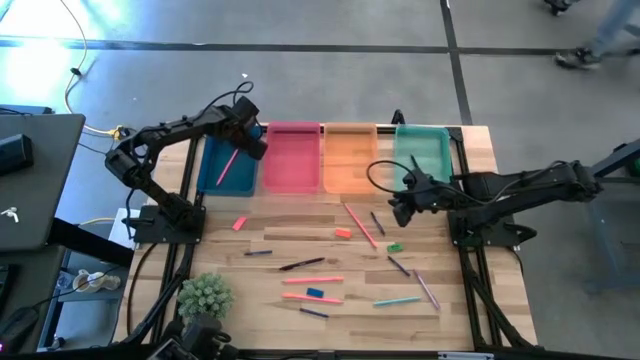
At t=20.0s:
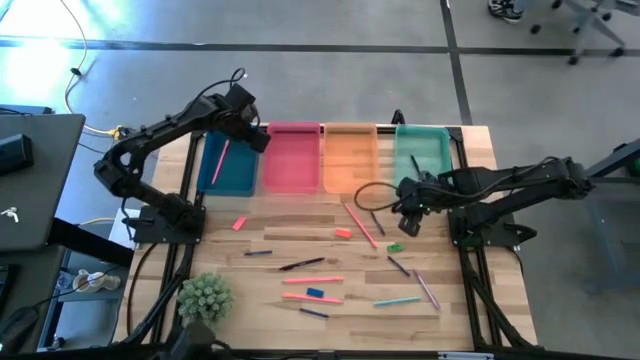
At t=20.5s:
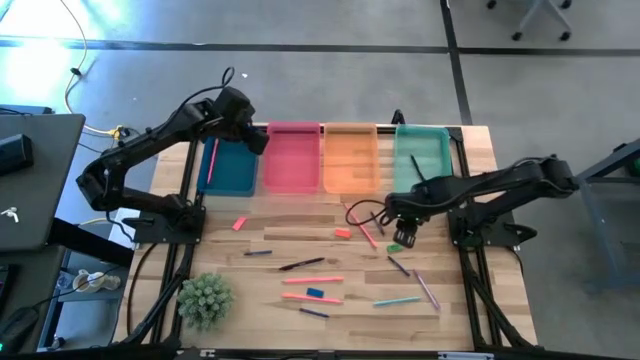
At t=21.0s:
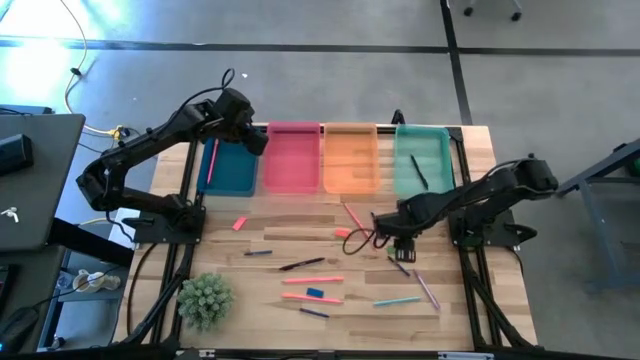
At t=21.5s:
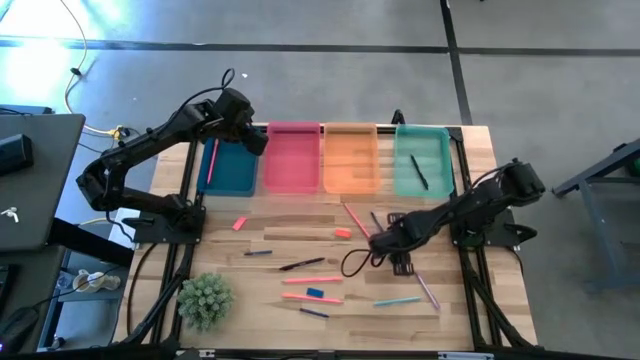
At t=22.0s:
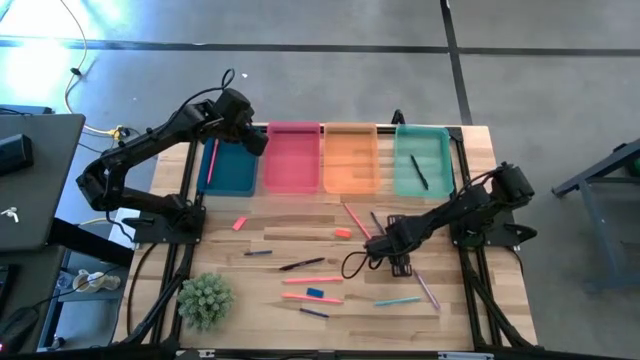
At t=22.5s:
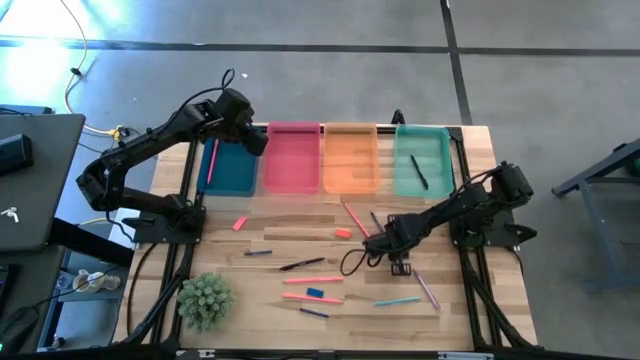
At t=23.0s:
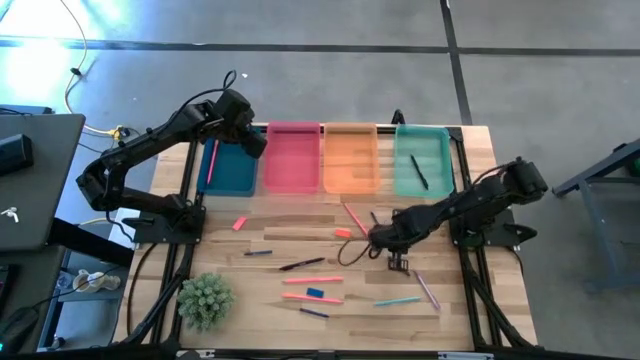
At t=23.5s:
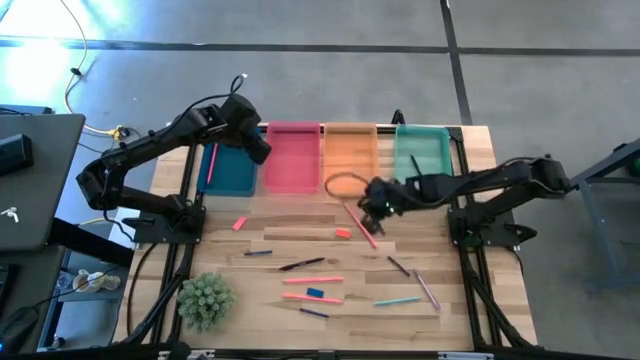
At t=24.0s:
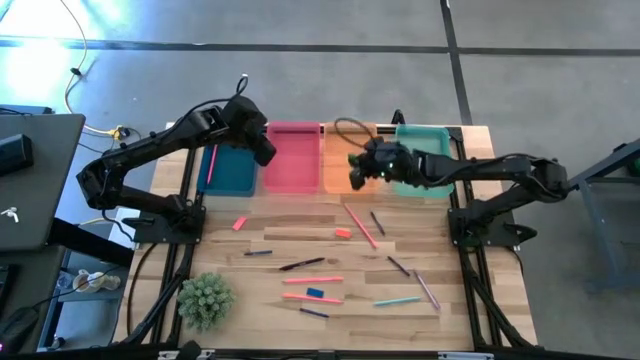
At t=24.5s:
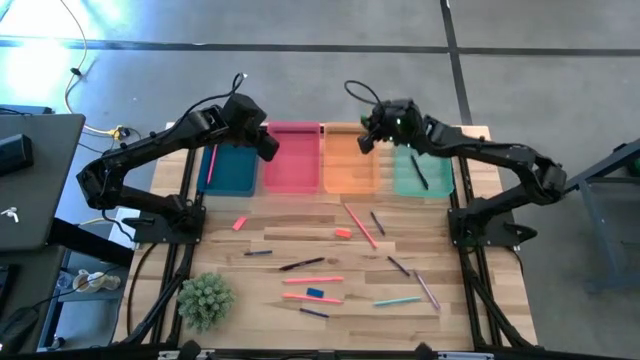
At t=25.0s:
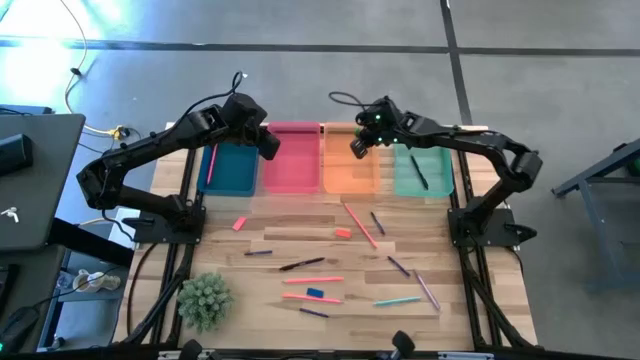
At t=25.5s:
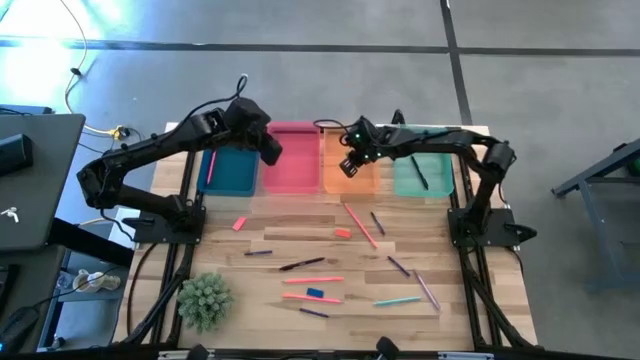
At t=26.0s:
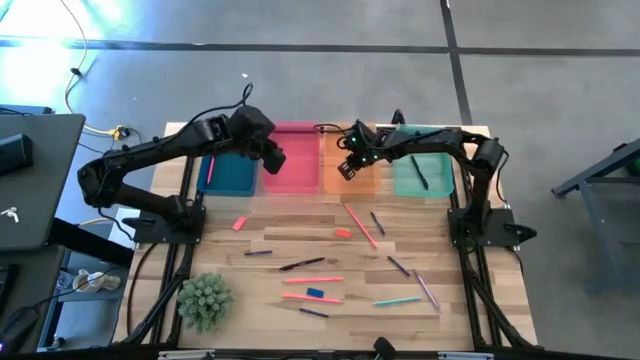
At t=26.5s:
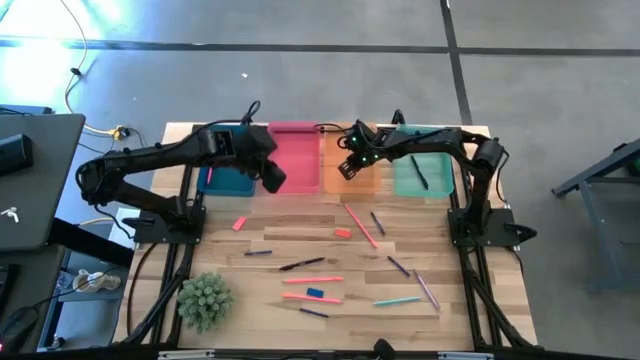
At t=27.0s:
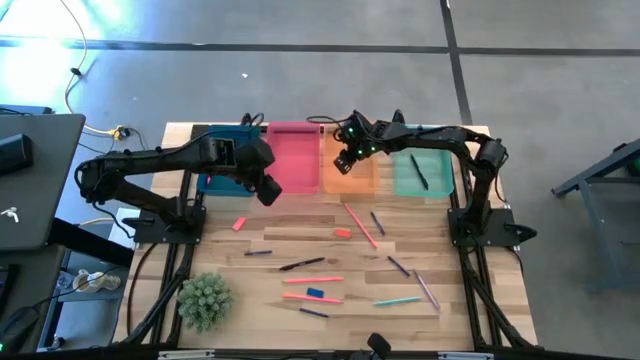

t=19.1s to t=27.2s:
Task: Sort crayons/erasers/pens/pencils in bins
Put the green eraser into the orange bin

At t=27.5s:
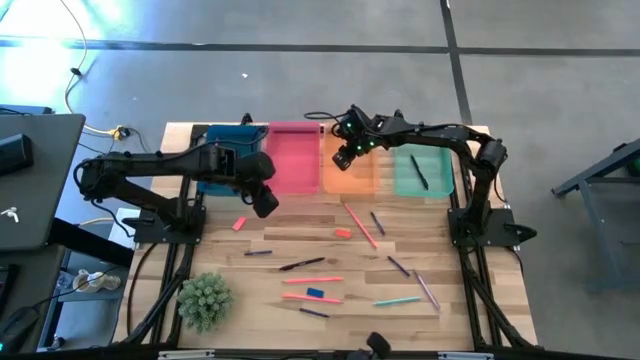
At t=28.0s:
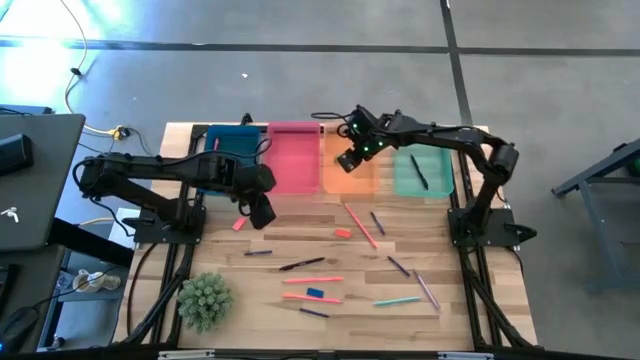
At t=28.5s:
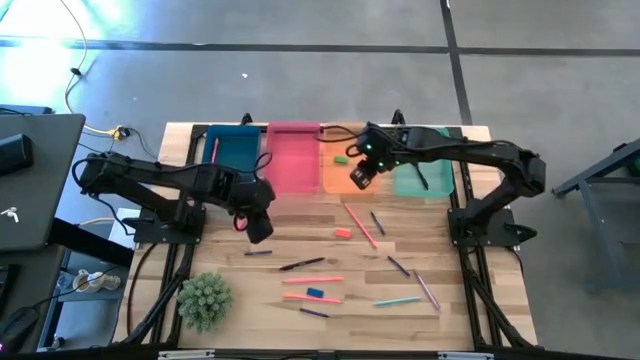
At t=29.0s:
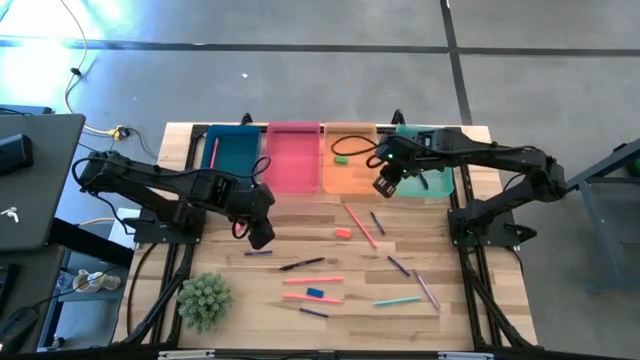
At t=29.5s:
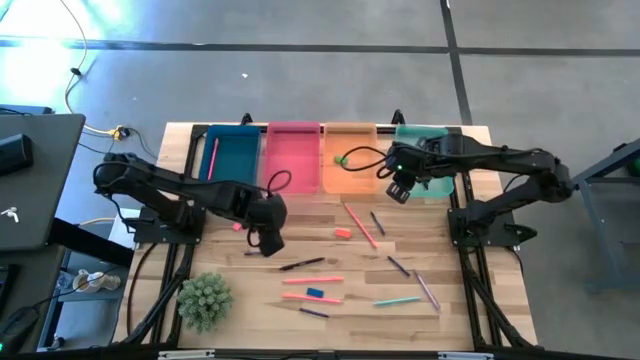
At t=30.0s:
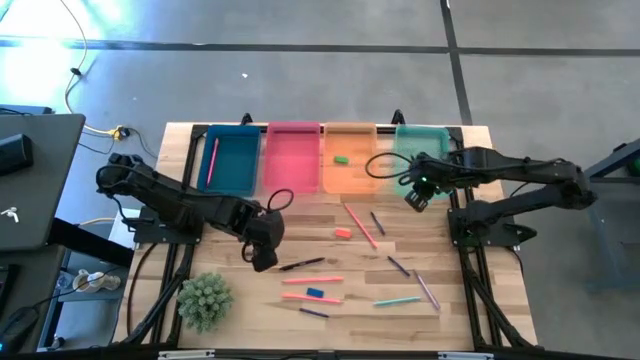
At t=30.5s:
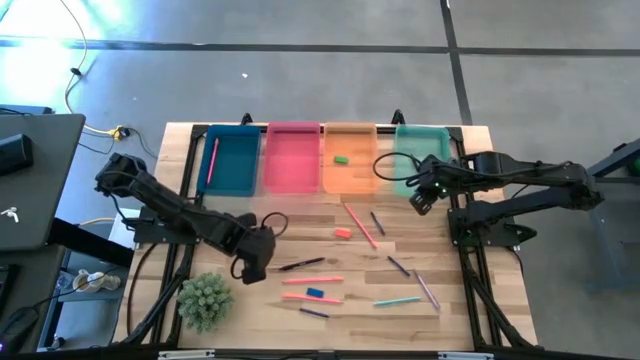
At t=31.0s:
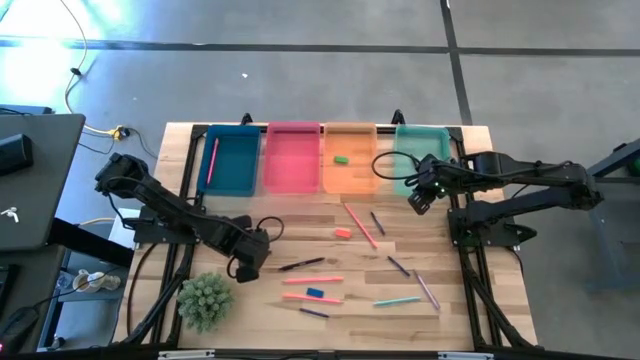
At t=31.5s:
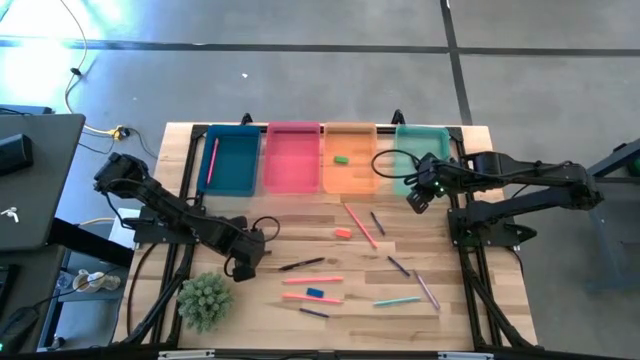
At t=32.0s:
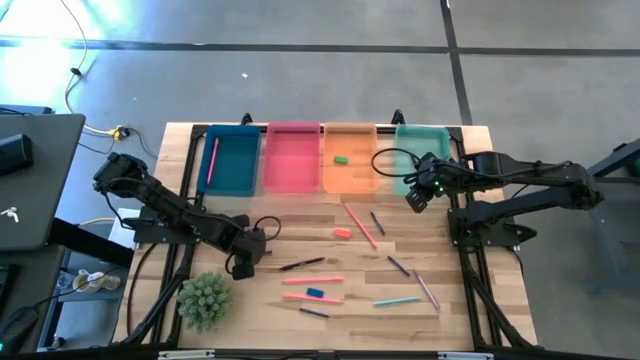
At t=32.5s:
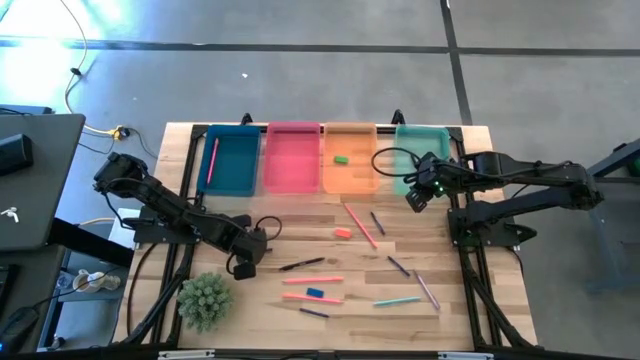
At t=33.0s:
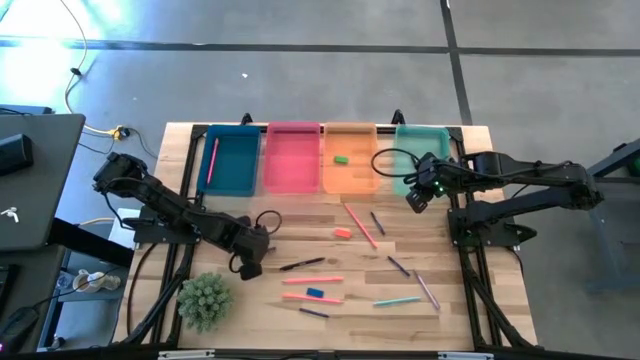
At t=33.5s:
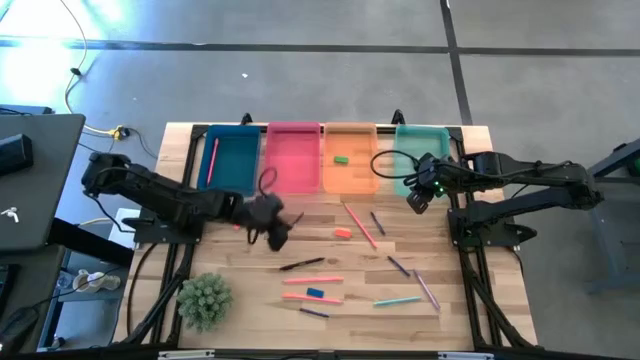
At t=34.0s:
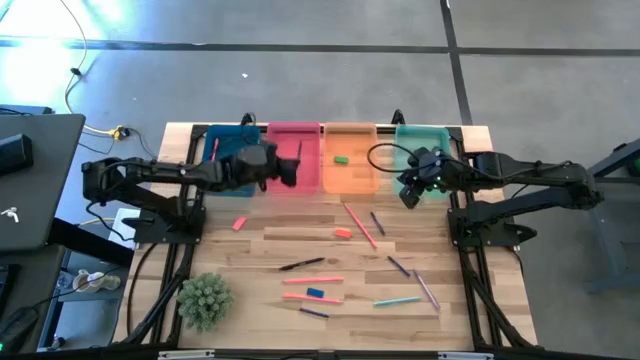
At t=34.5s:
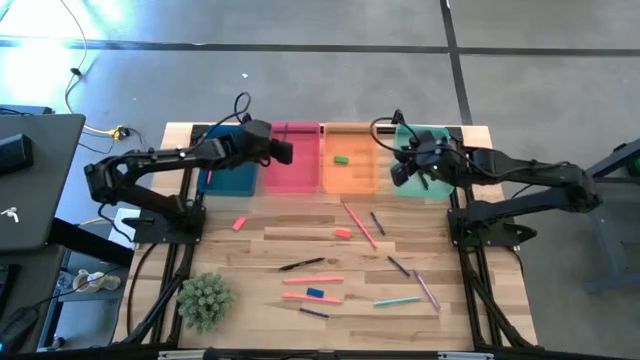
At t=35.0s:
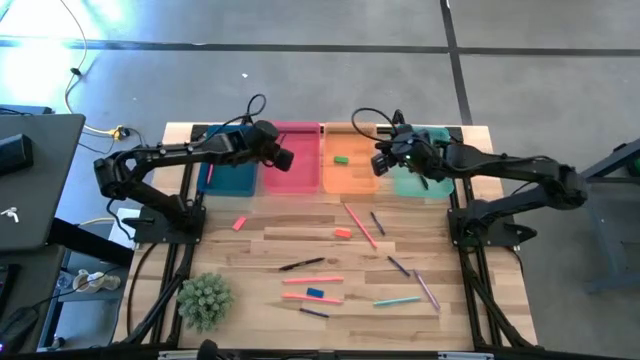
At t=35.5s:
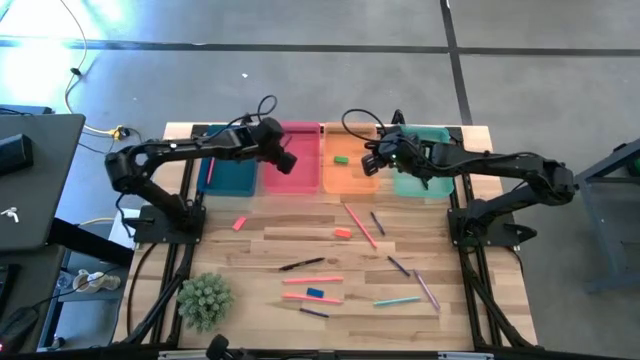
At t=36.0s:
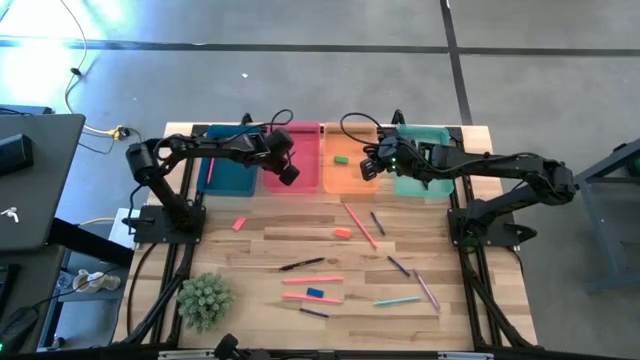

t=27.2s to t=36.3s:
Put the left blue crayon into the pink bin

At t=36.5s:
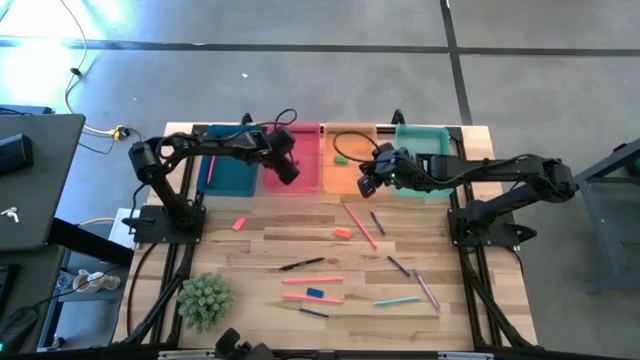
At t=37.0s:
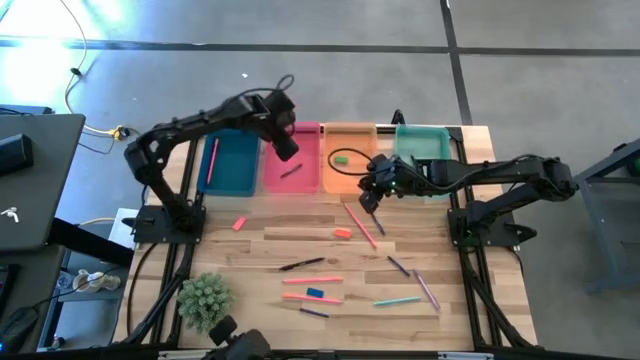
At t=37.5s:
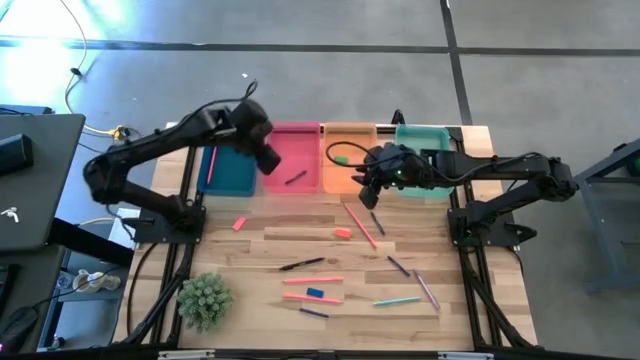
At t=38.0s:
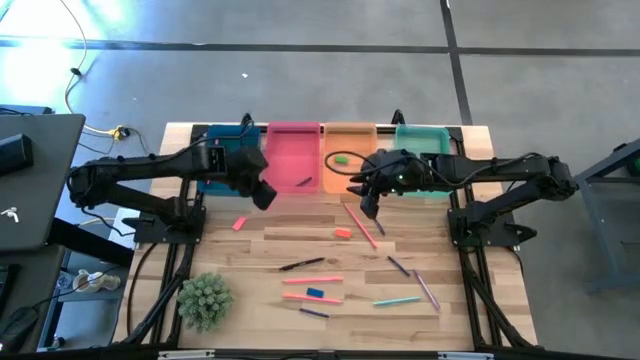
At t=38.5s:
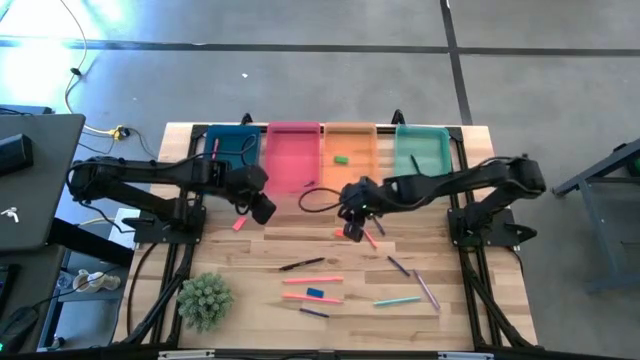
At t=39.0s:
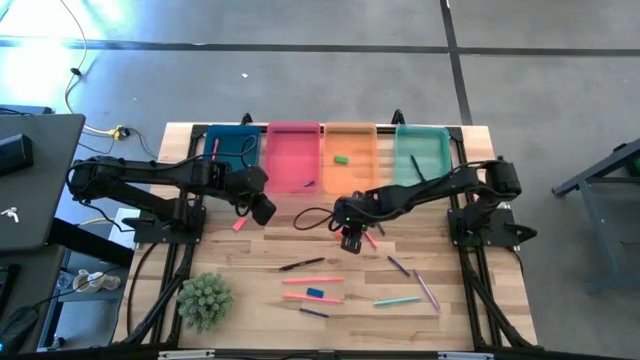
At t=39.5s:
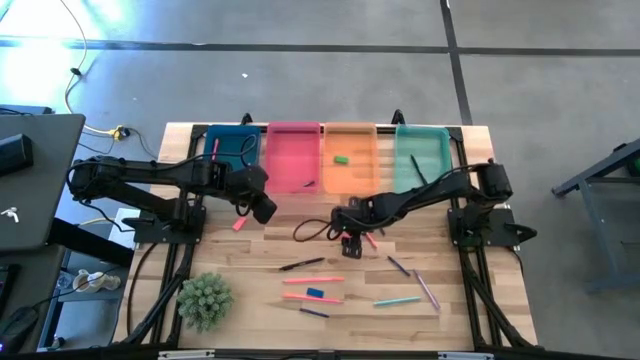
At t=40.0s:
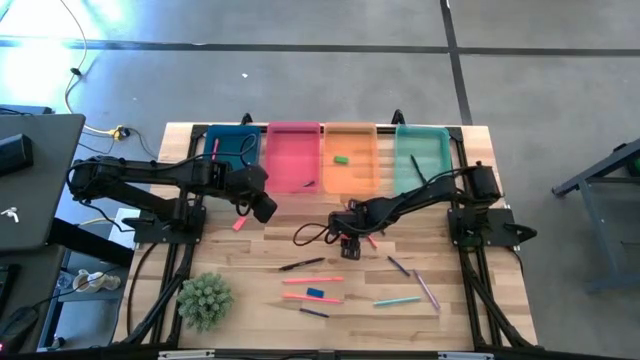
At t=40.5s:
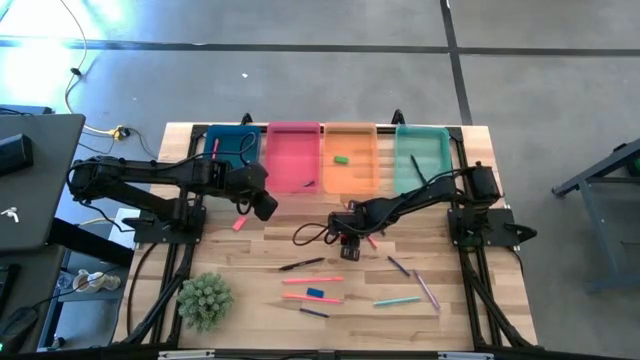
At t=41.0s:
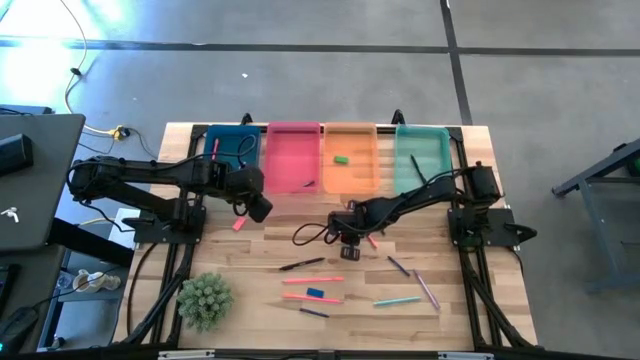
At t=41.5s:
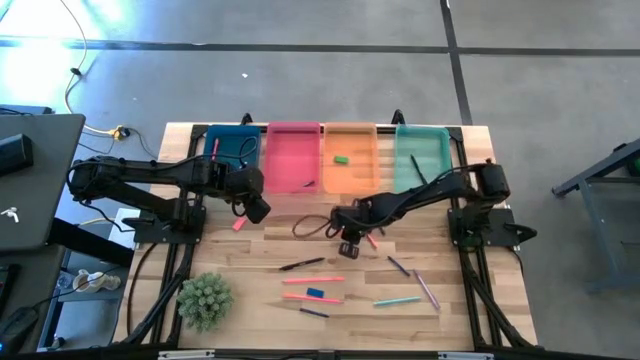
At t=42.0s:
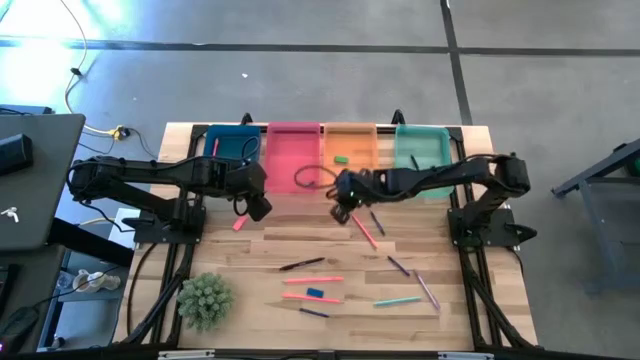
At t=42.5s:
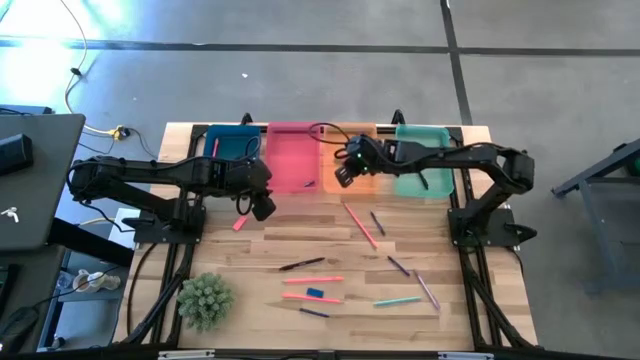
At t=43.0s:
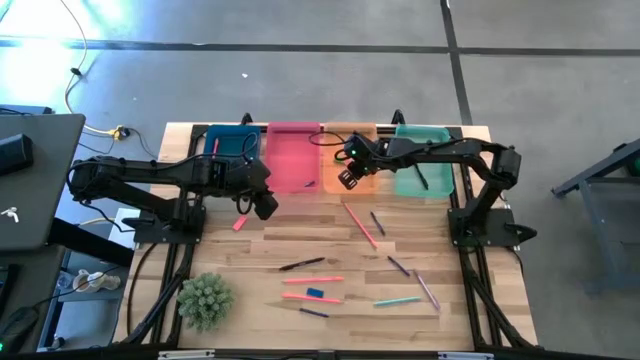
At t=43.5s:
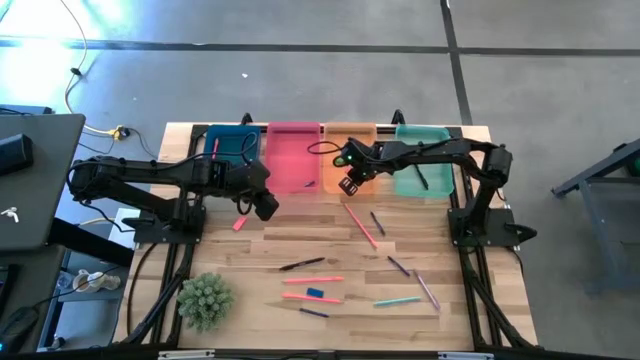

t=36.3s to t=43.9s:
Put the orange eraser into the orange bin
